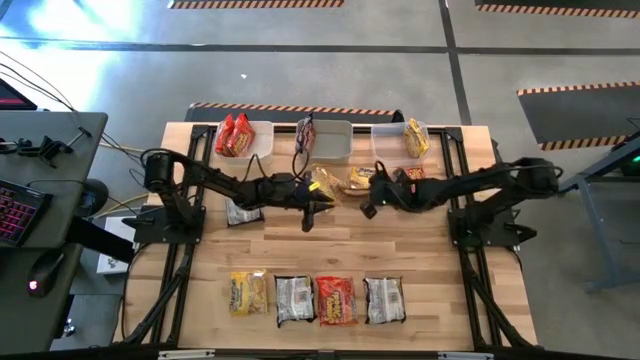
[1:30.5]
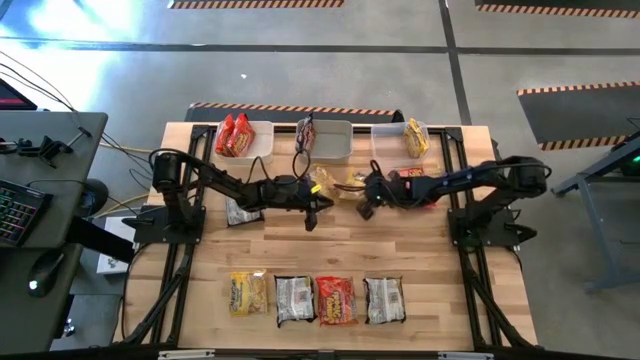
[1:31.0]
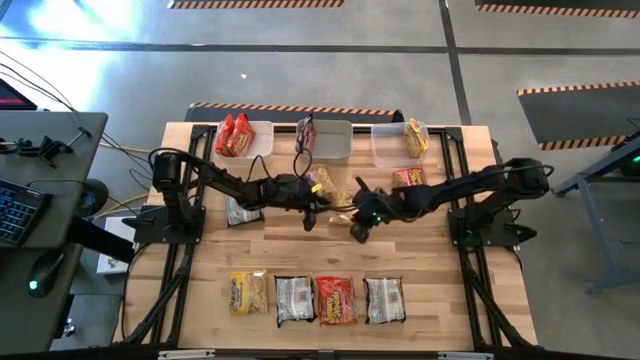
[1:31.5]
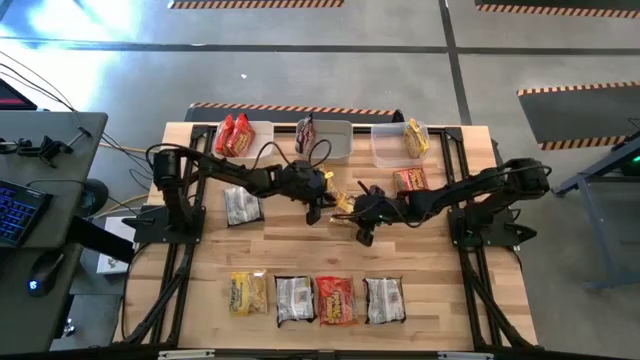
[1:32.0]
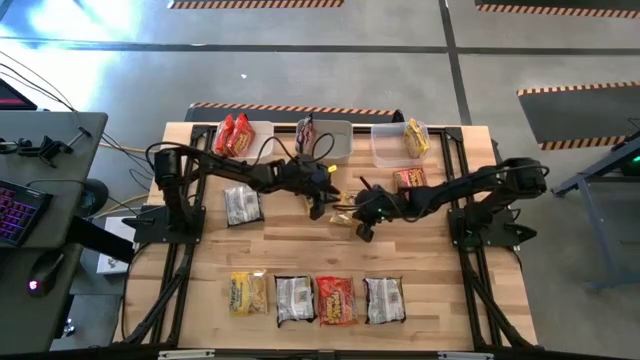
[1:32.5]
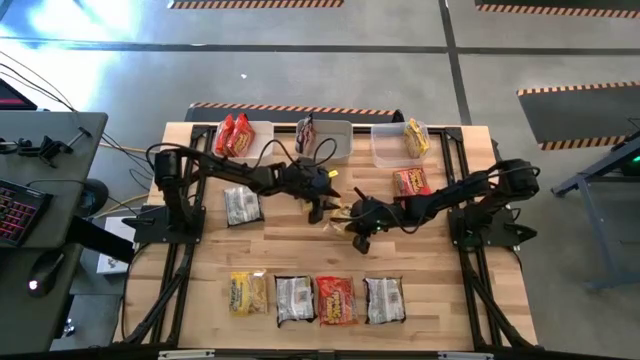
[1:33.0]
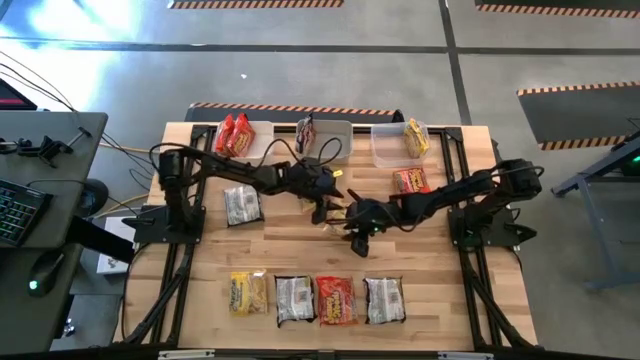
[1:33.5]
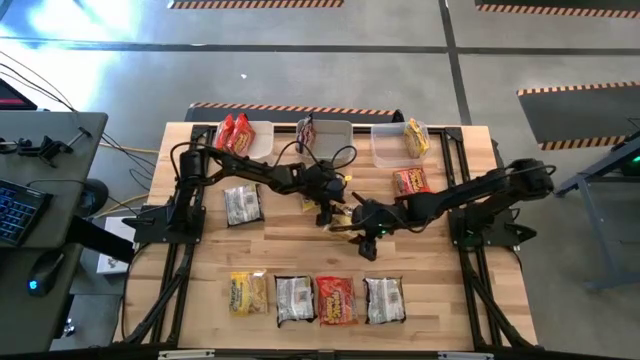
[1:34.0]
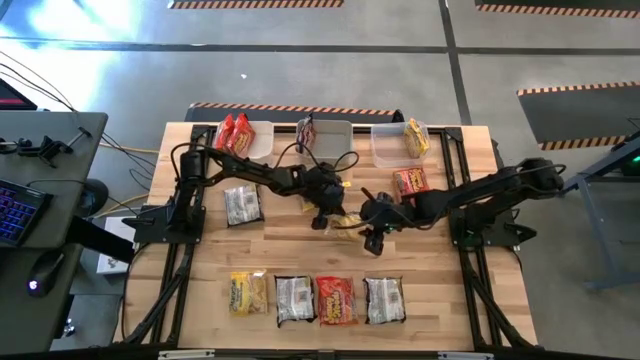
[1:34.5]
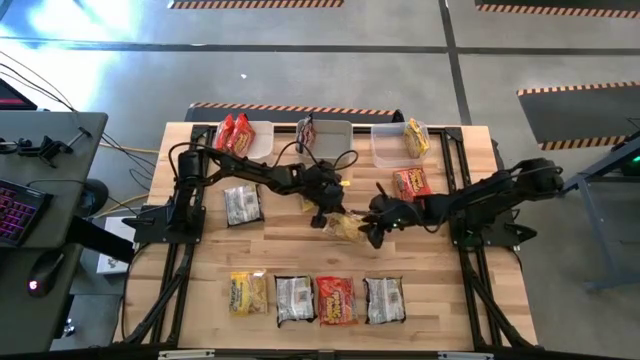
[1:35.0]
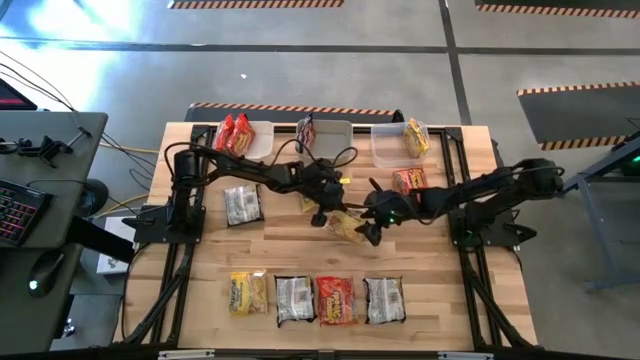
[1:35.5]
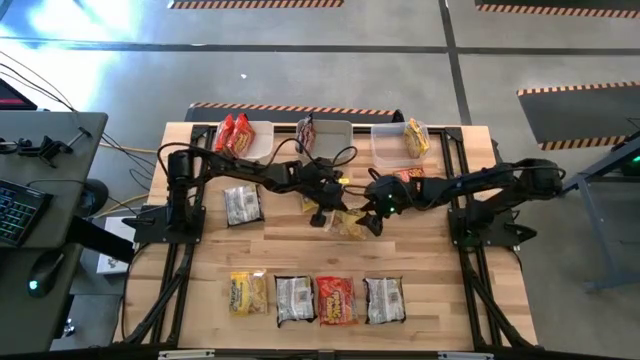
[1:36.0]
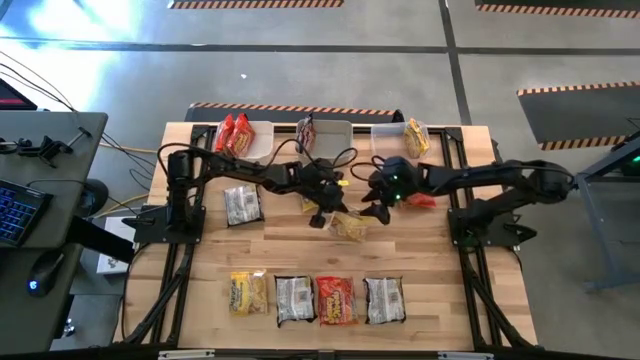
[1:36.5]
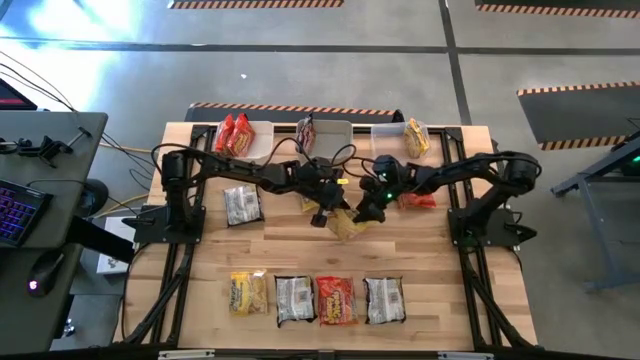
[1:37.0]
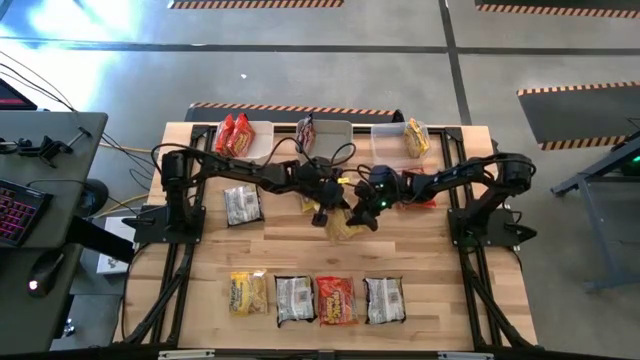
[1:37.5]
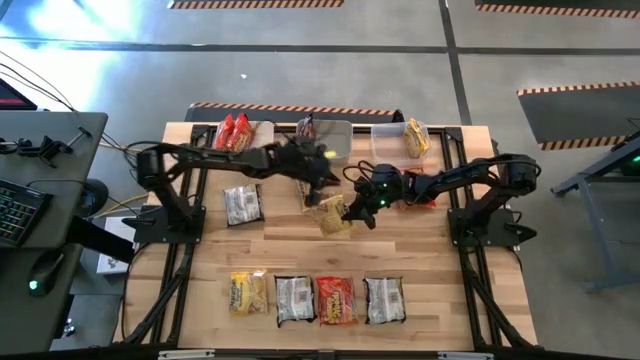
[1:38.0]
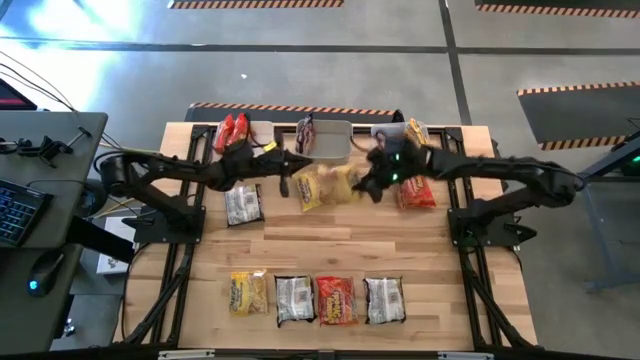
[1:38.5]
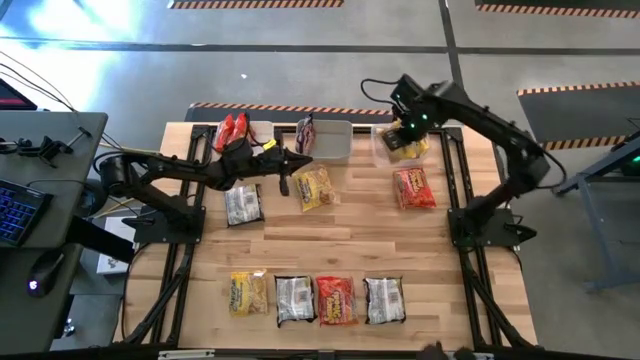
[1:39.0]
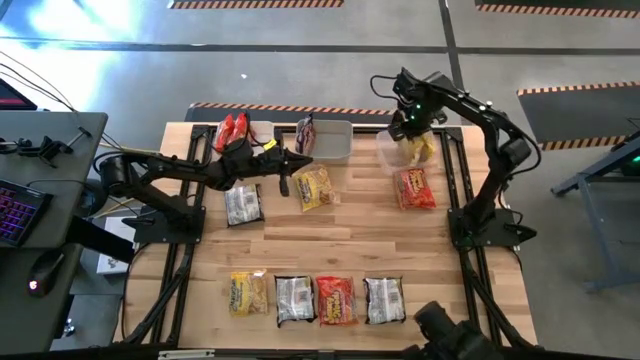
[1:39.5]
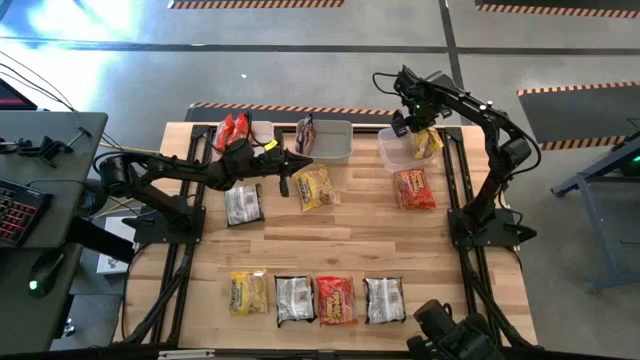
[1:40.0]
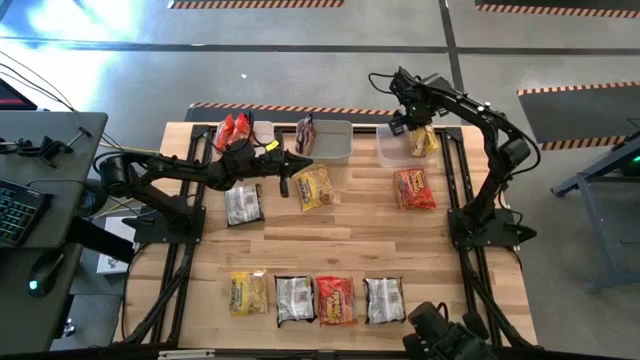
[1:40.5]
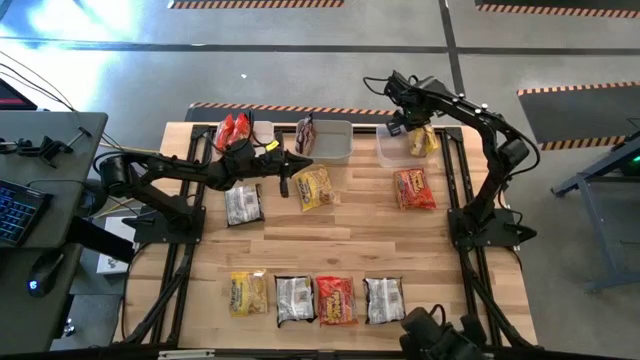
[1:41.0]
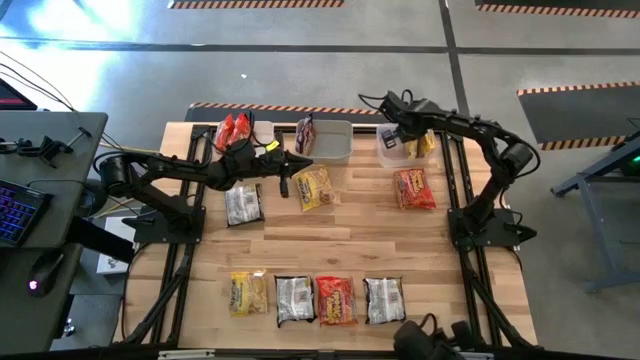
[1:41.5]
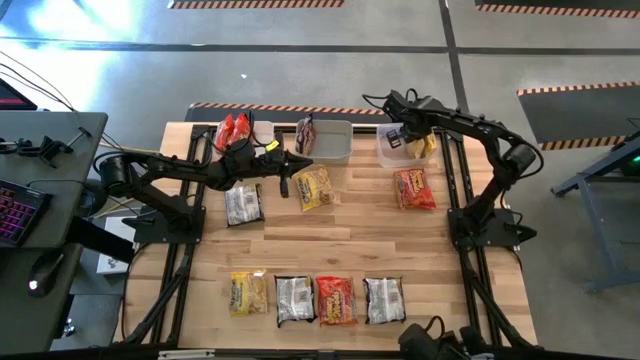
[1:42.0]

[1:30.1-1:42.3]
Task: Sort Maruchan noodles
Put the yellow noodle pack into the transparent bin

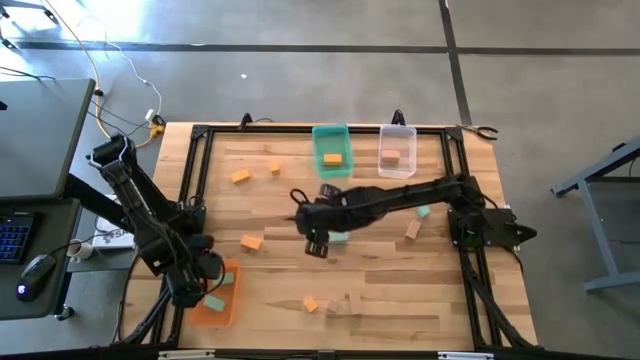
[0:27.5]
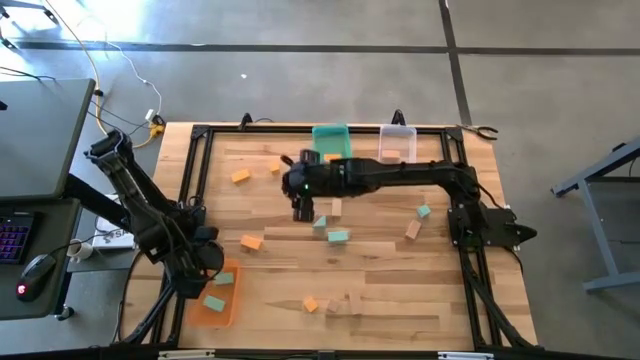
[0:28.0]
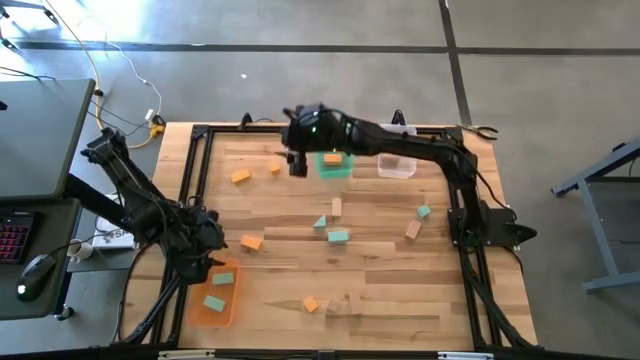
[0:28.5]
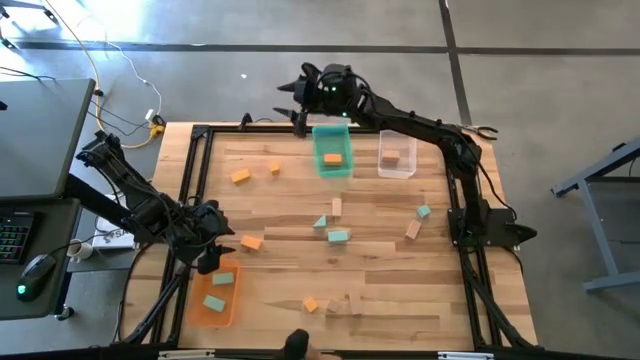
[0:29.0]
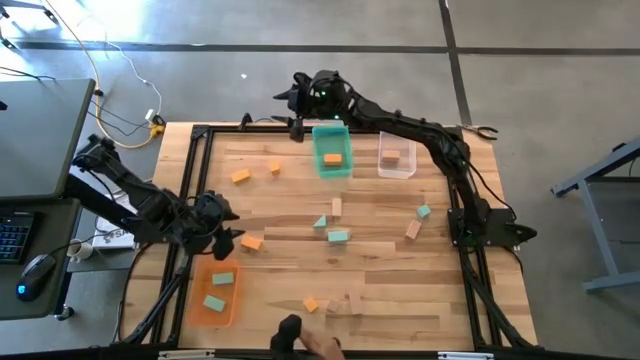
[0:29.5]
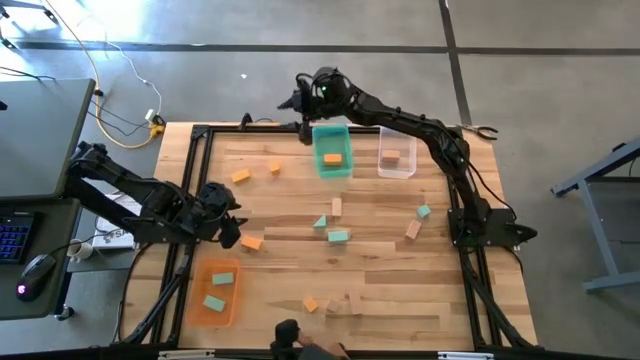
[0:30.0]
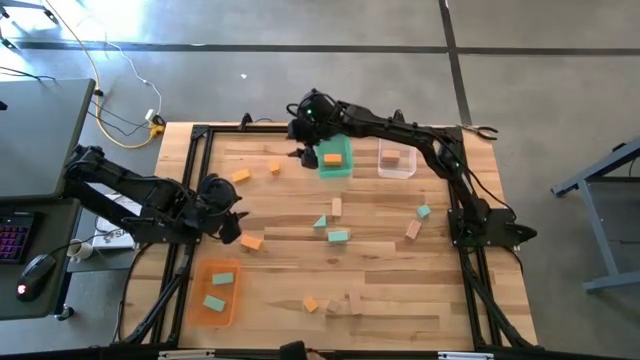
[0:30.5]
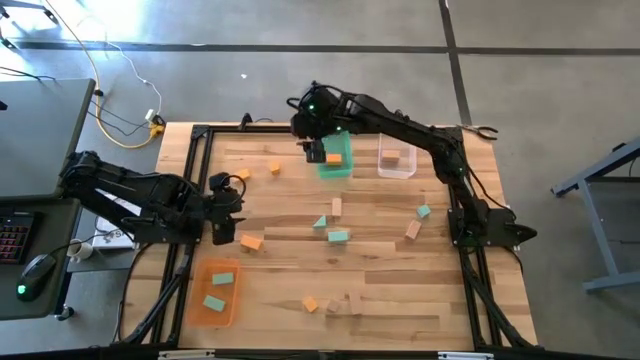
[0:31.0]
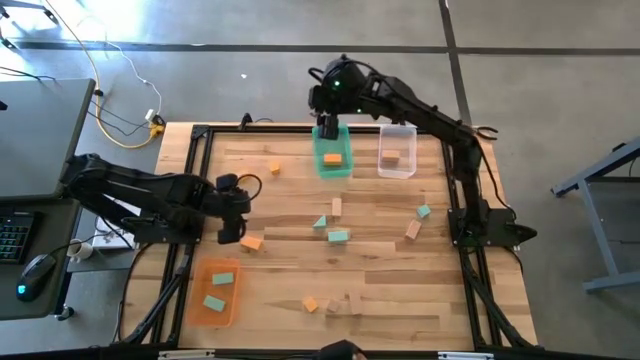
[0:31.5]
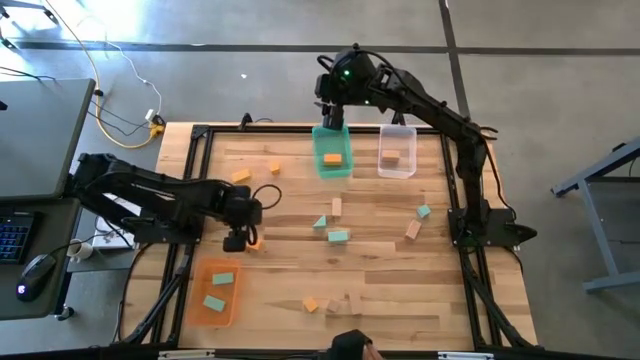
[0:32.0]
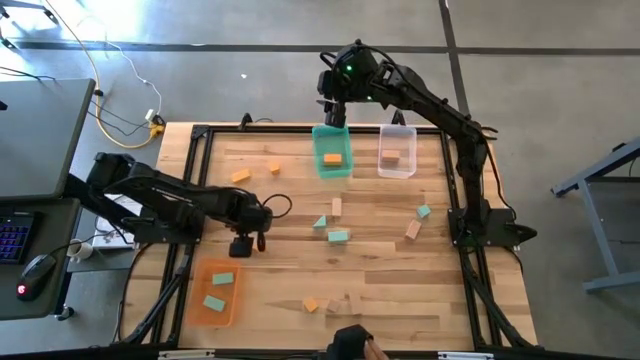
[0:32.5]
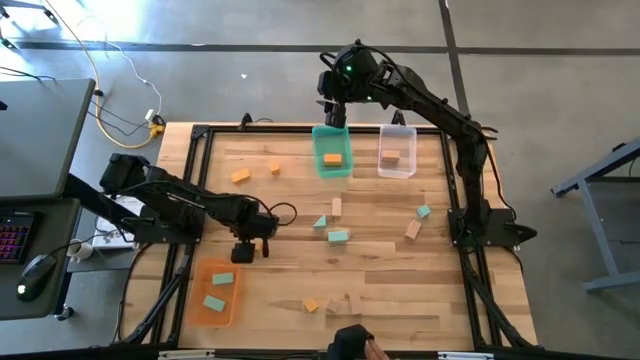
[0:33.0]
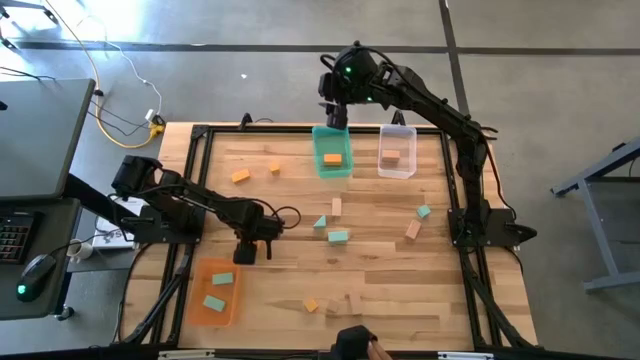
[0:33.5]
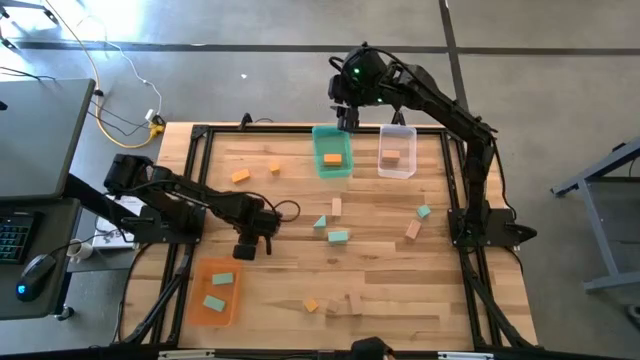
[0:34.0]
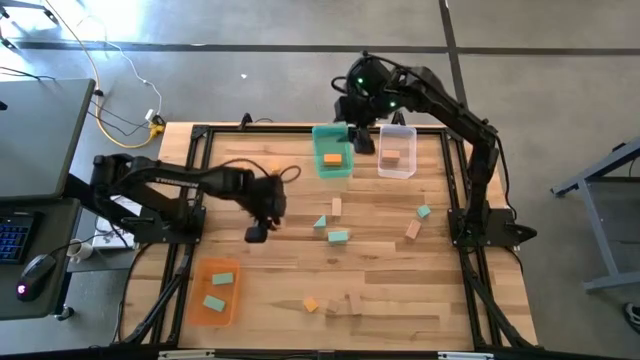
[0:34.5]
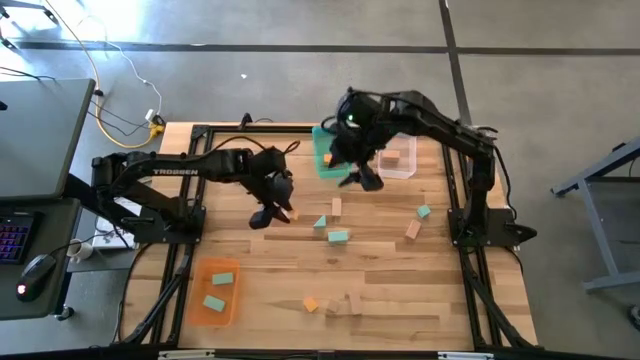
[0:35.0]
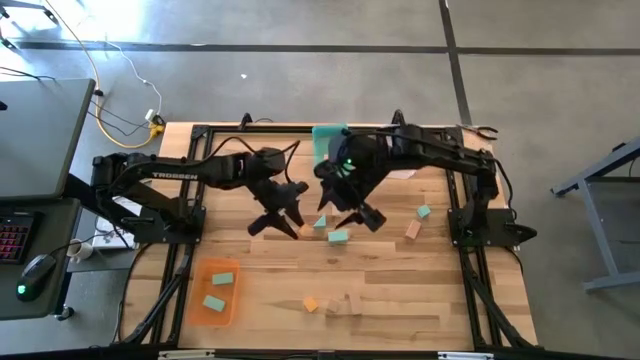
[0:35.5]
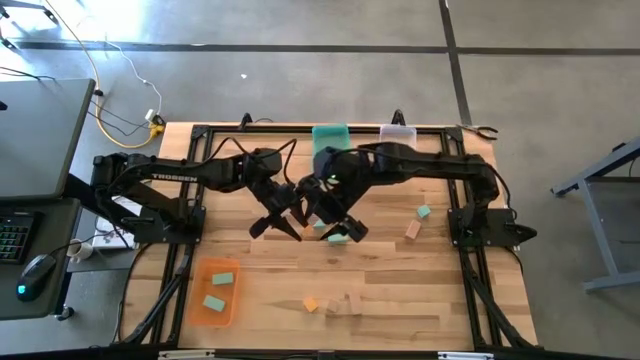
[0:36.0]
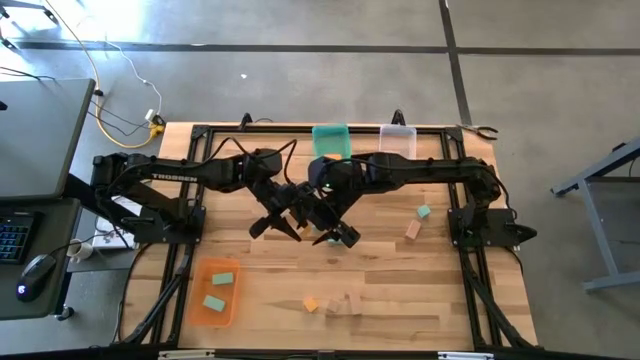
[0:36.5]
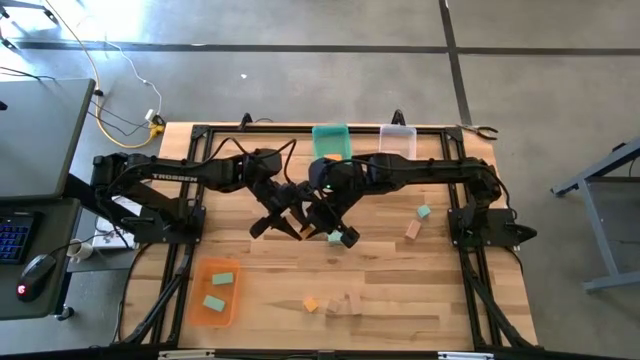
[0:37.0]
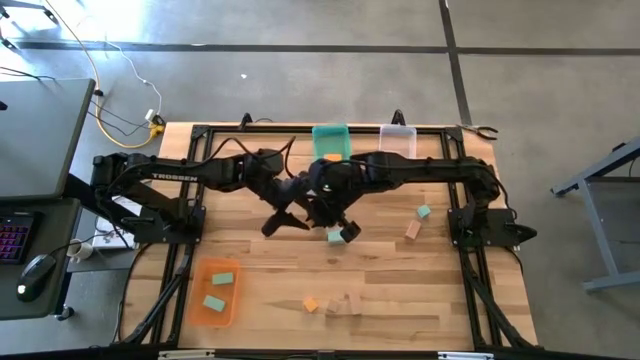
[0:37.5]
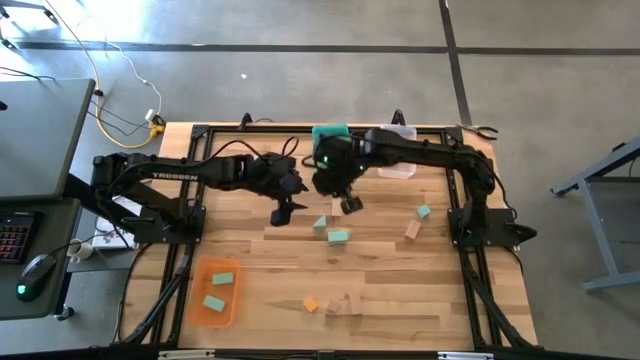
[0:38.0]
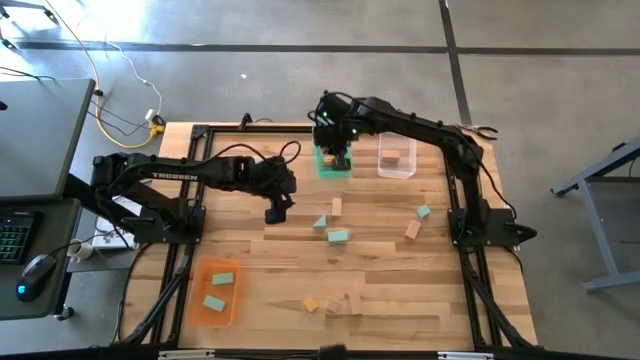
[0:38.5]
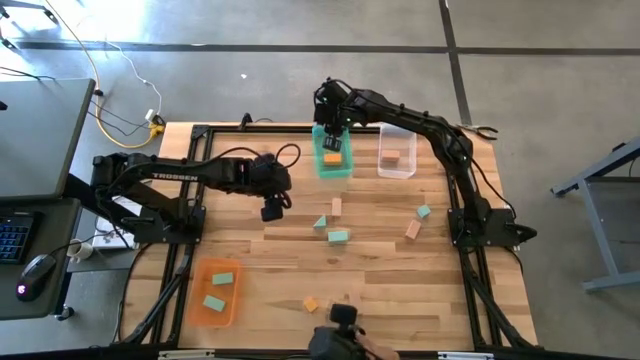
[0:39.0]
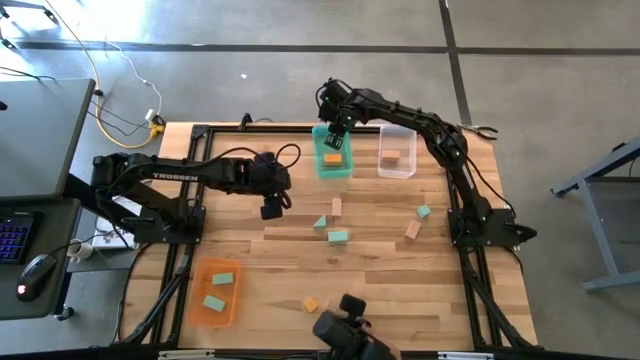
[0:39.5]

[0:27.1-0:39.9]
Task: Sort & place blocks by color
Put the yellow block into the blue bin
